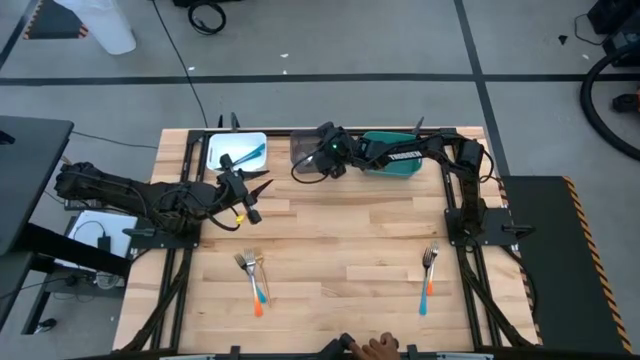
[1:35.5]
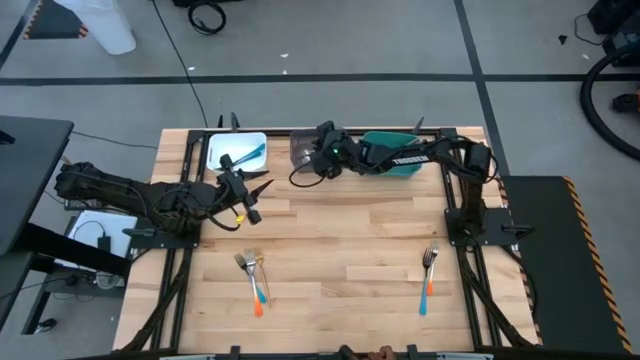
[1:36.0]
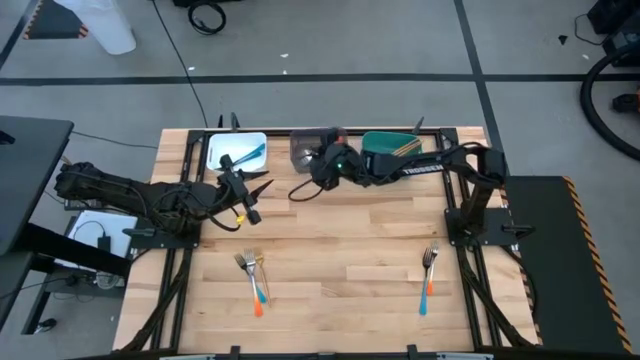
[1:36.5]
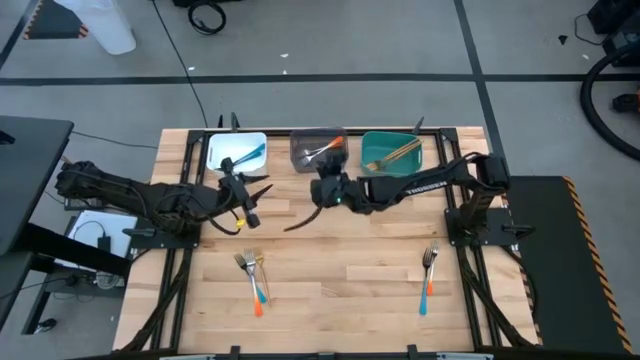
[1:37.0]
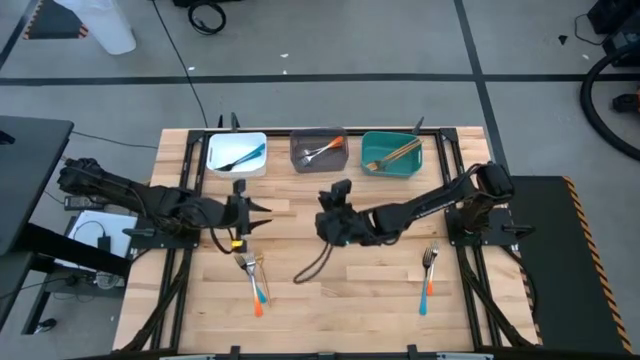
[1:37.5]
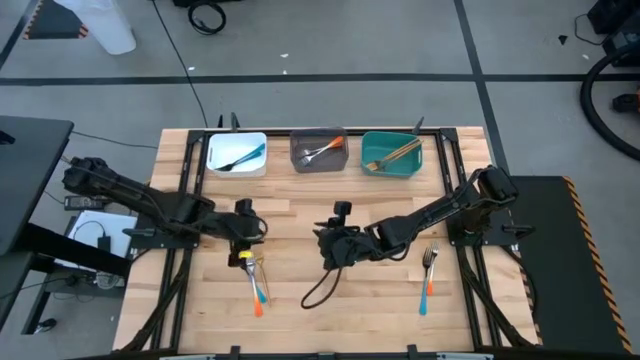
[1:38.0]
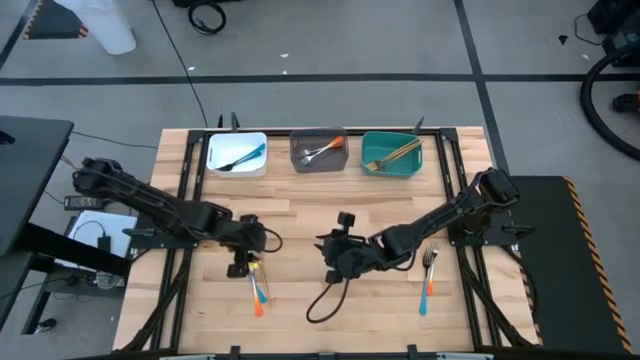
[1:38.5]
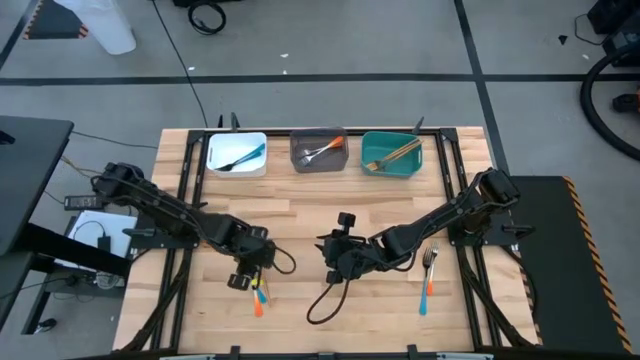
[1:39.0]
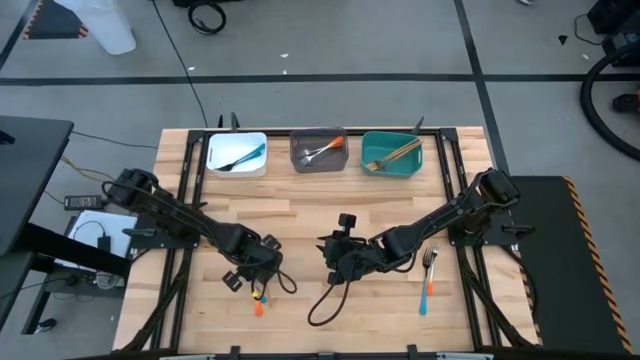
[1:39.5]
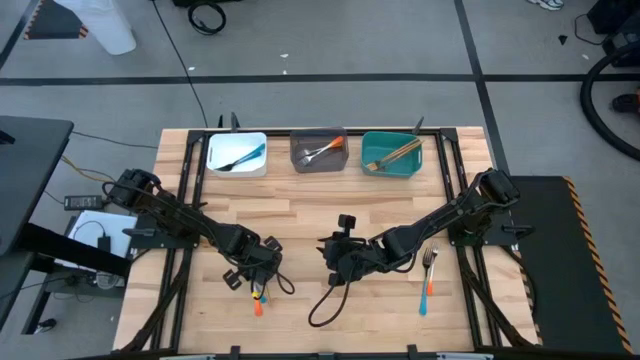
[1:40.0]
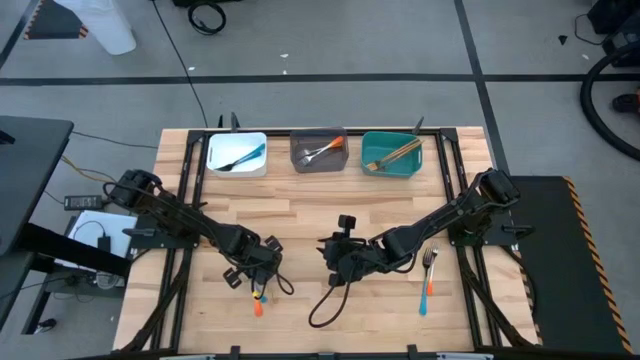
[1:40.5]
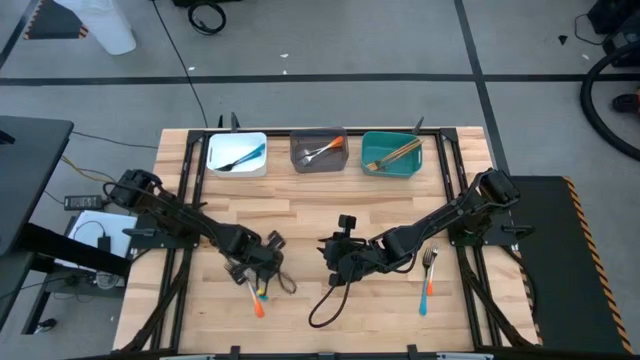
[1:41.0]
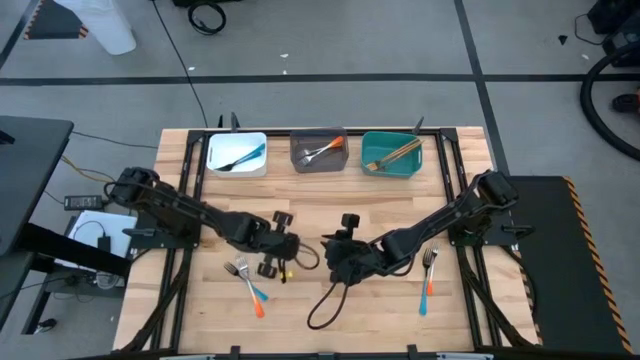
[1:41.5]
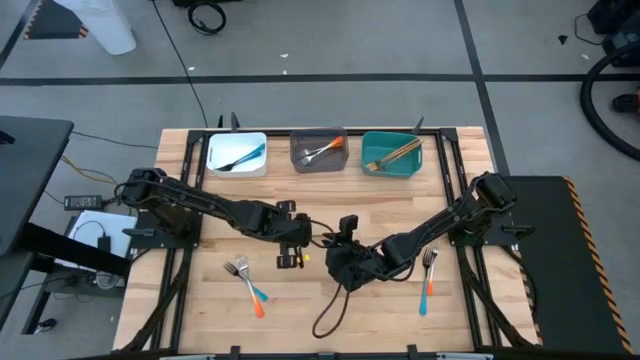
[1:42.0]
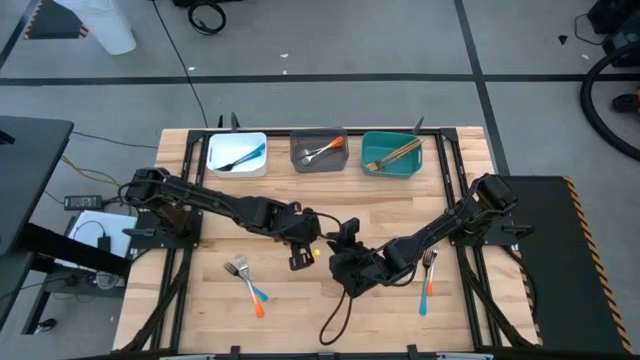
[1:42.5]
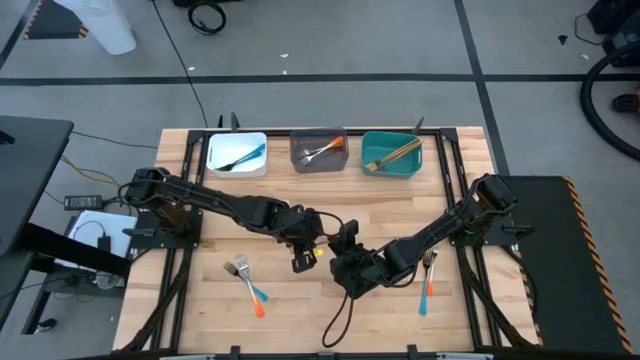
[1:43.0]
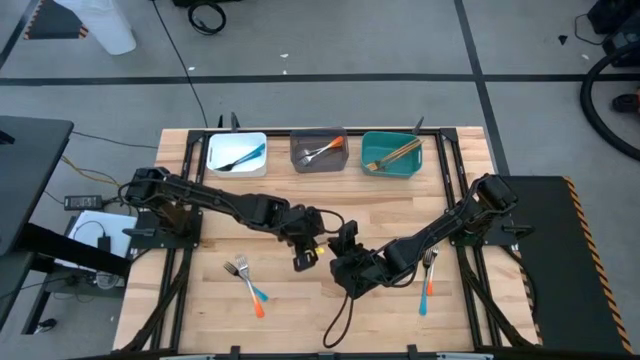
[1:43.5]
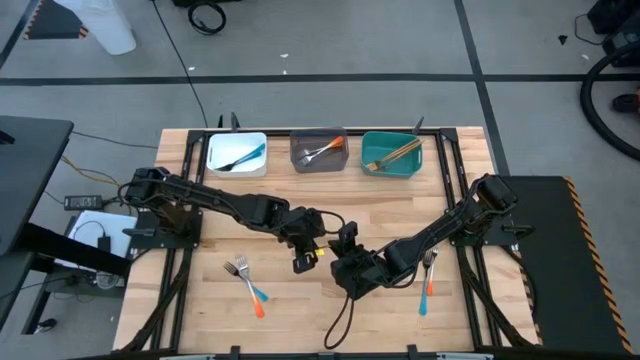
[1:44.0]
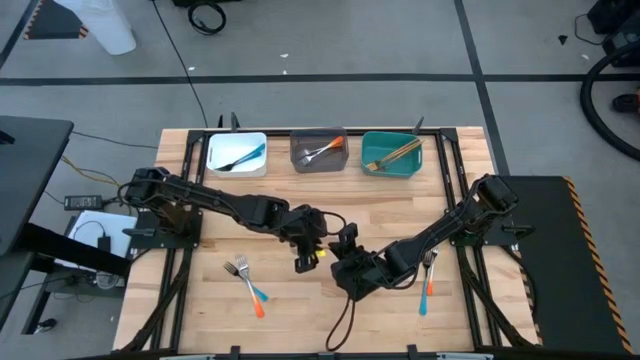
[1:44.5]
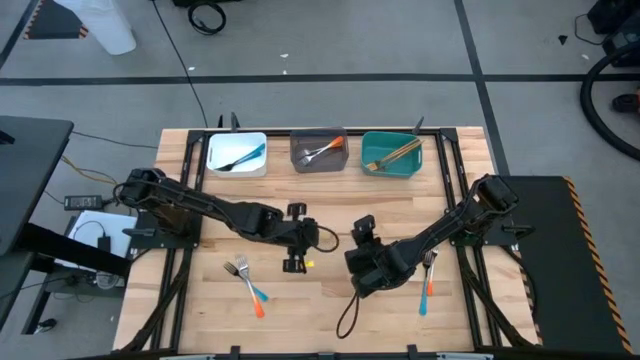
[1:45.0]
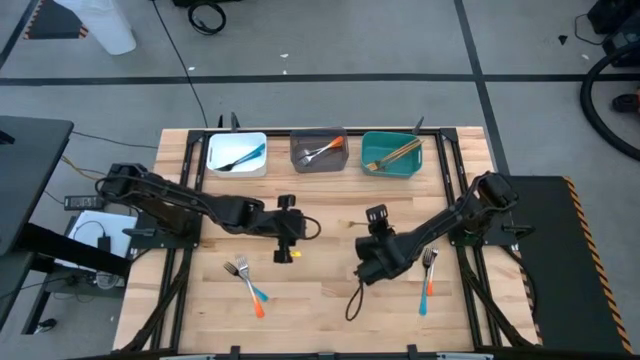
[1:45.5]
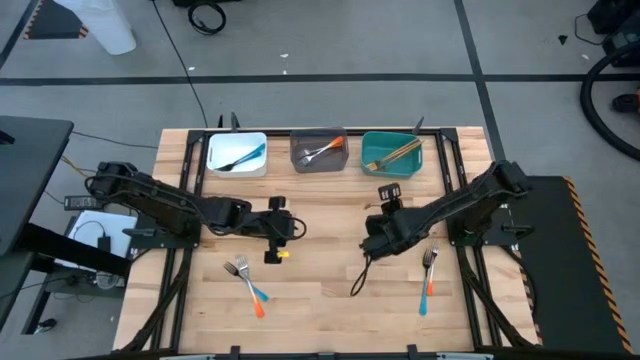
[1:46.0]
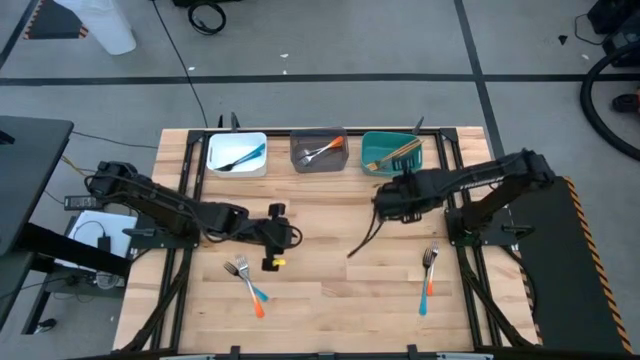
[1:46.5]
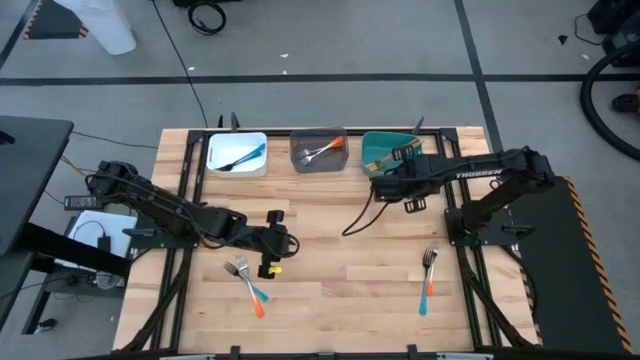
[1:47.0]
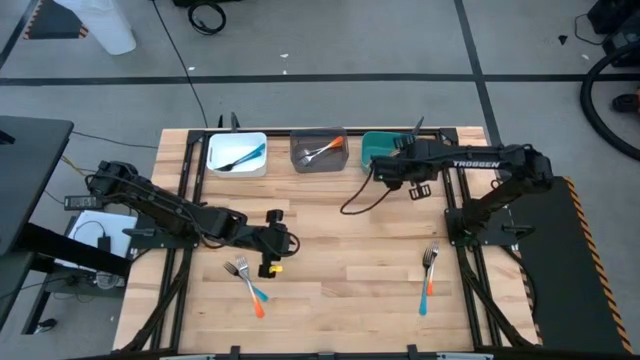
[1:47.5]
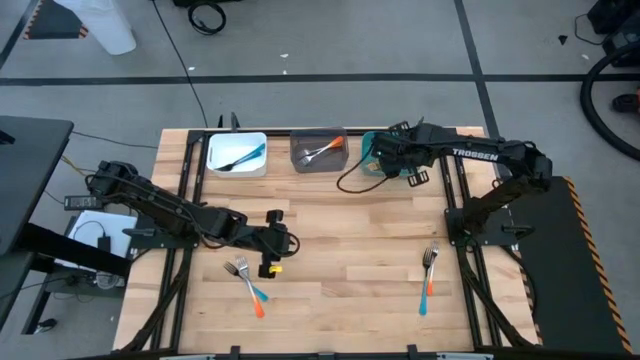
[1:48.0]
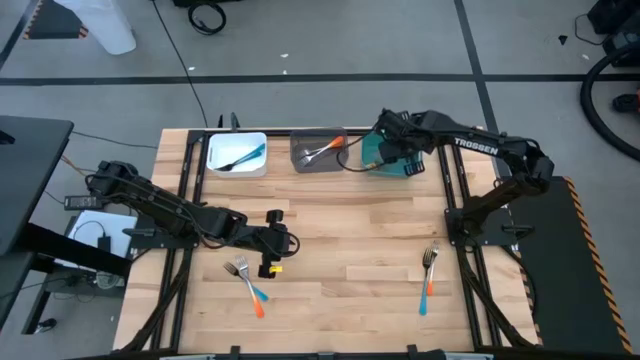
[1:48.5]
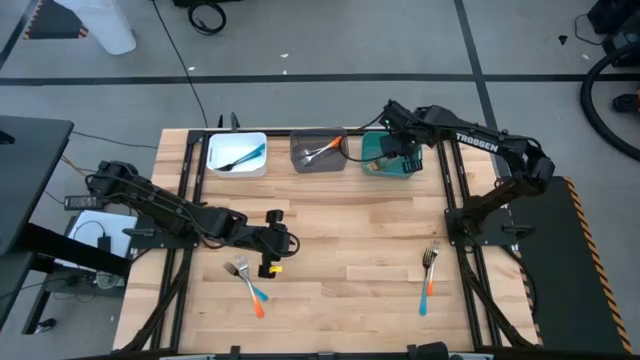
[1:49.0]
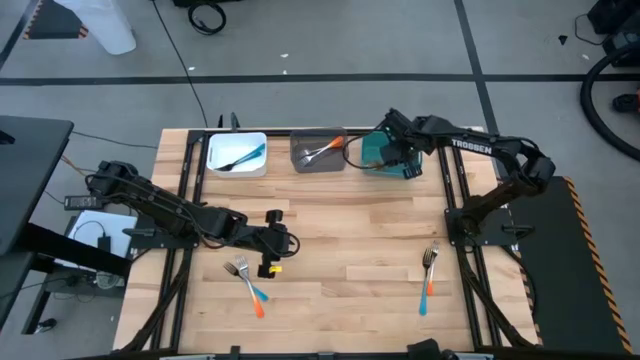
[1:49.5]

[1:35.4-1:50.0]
Task: Sort silverware by color (type)
Put the gold fork into the green bin

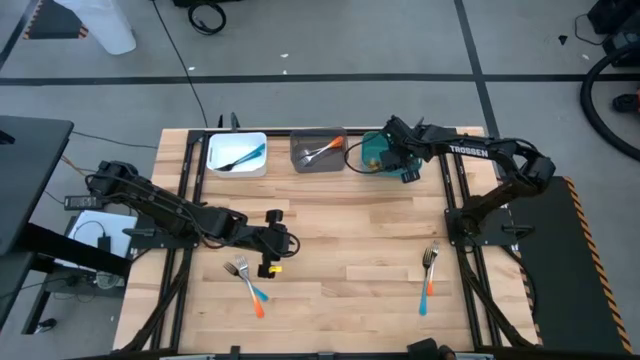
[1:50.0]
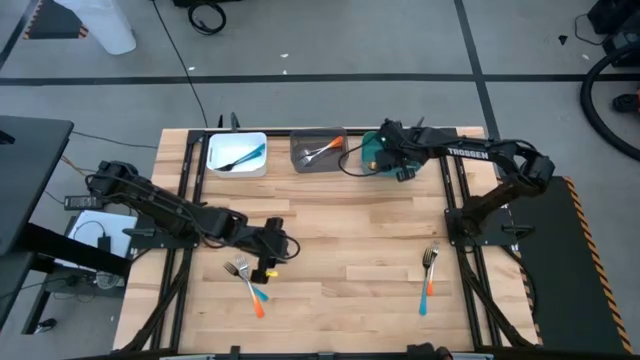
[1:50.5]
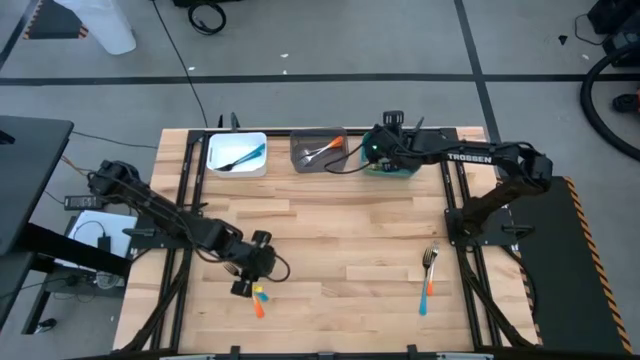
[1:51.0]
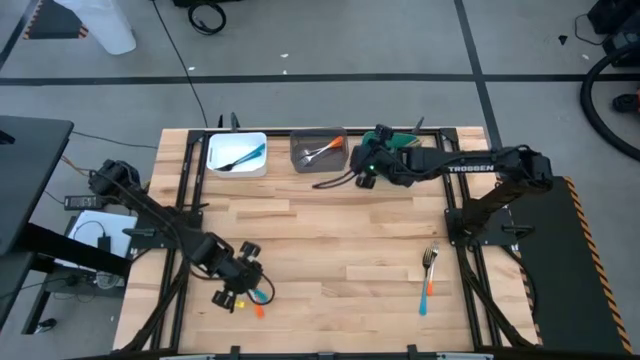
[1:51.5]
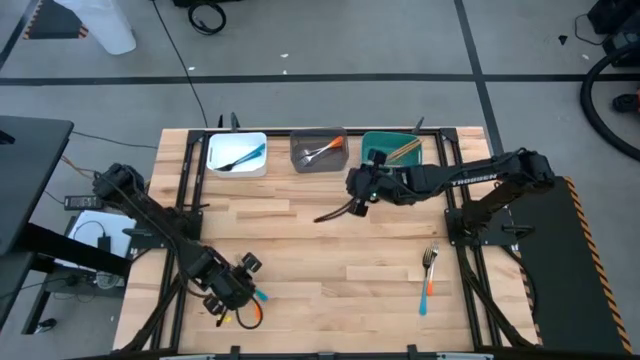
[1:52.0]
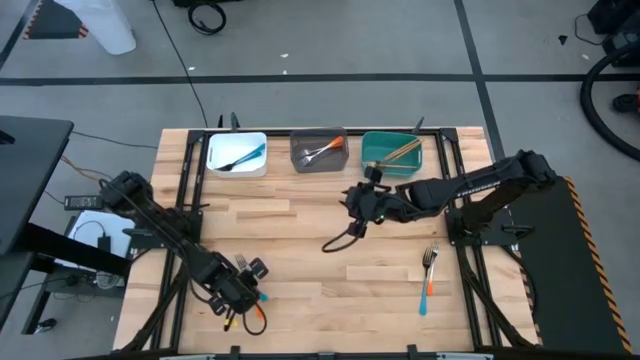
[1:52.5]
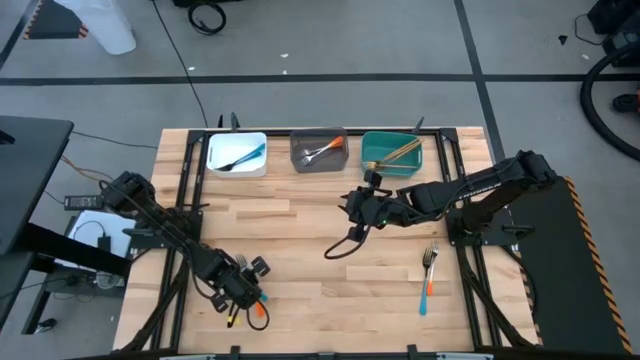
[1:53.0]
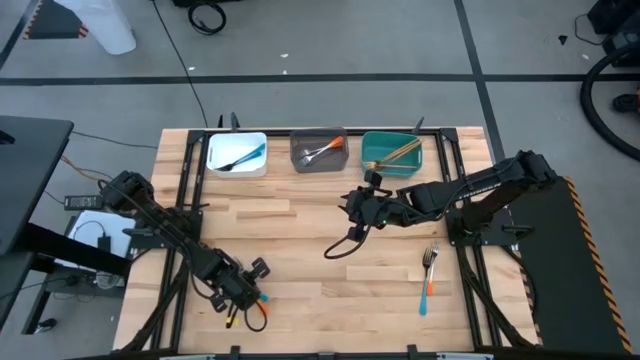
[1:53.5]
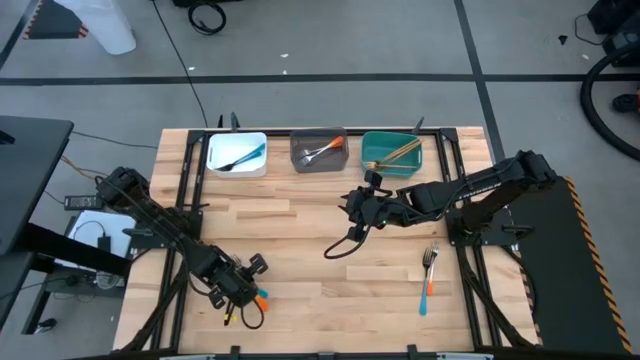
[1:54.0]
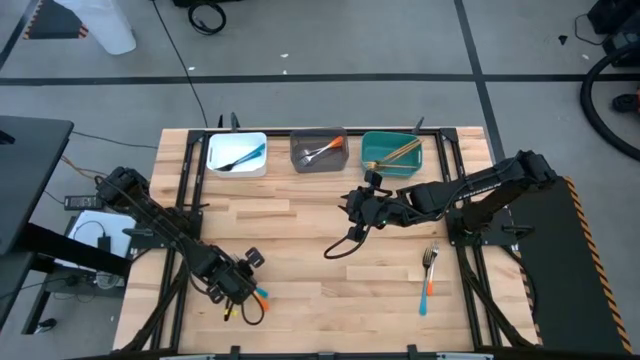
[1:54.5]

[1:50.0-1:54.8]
Put the orange fork into the black bin

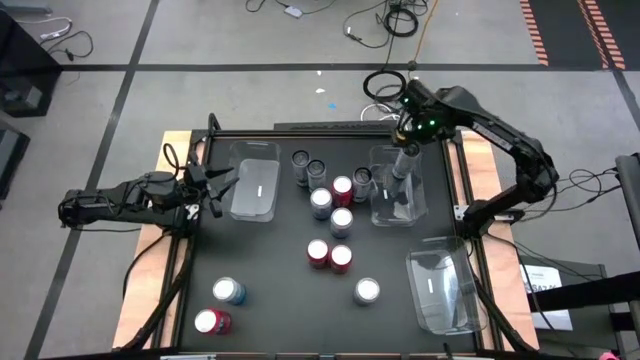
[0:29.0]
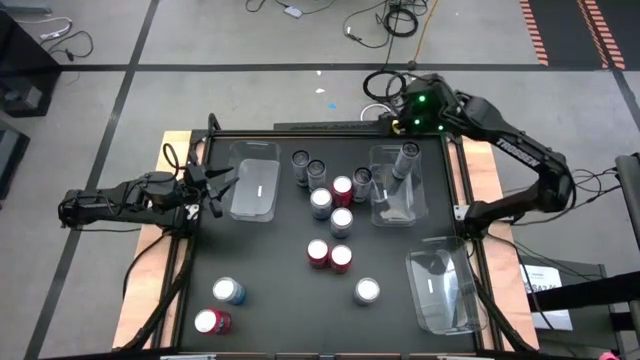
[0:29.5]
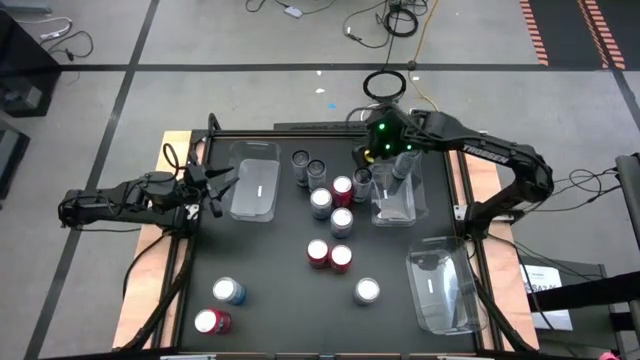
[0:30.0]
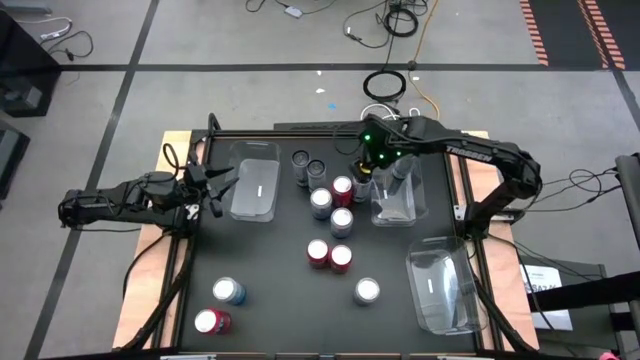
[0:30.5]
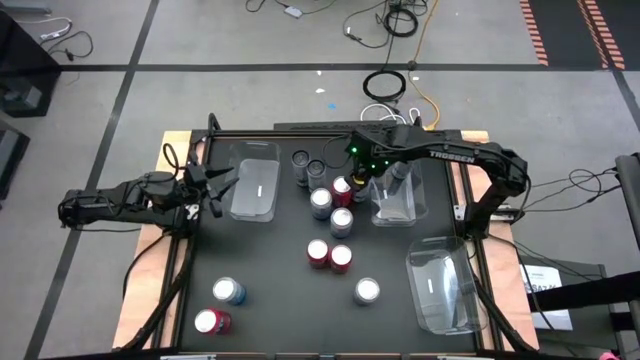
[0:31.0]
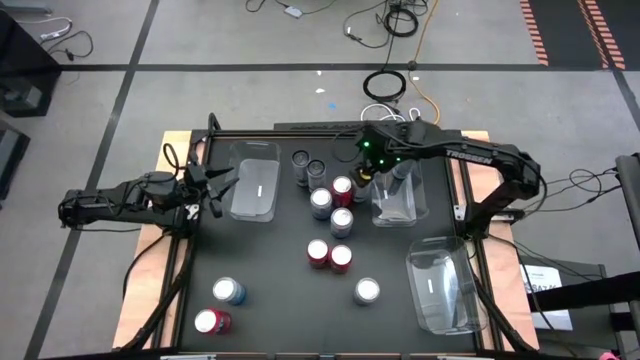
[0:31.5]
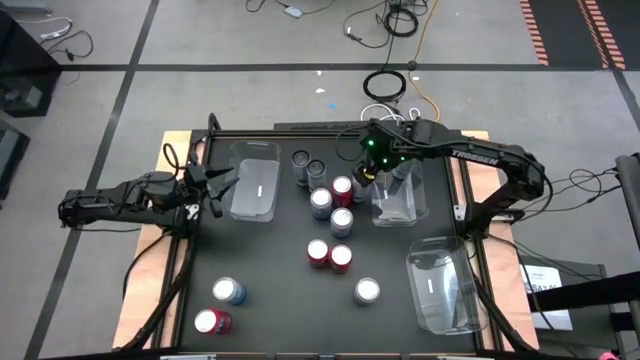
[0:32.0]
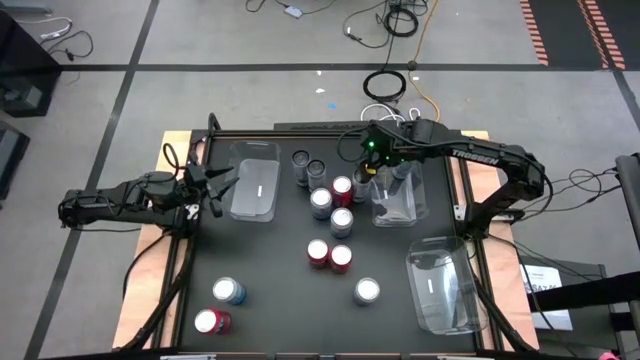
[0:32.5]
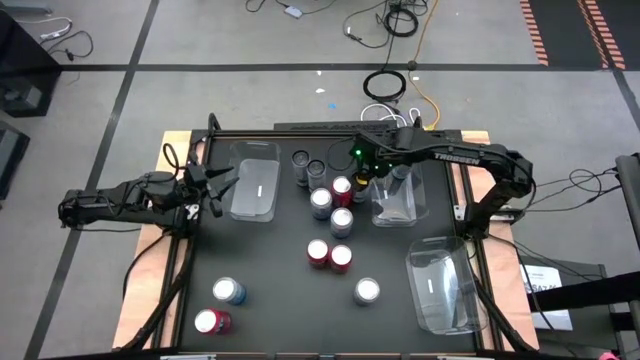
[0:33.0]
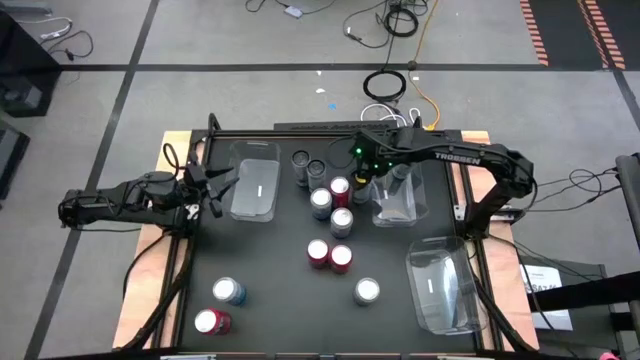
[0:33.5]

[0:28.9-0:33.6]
Task: Sort soda cans
Put the white soda can into the top right transparent bin
